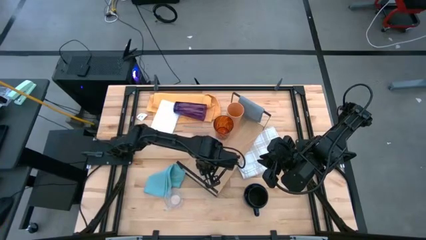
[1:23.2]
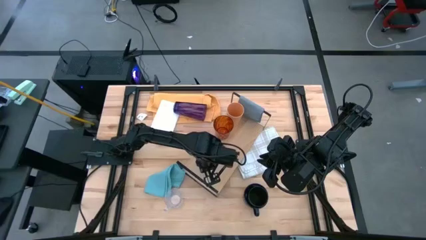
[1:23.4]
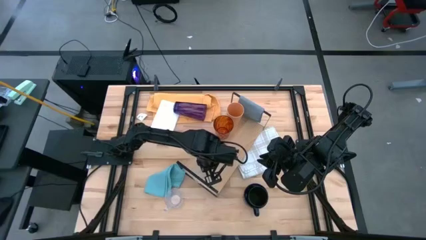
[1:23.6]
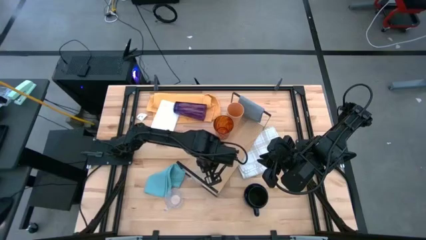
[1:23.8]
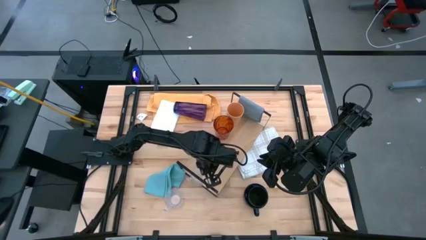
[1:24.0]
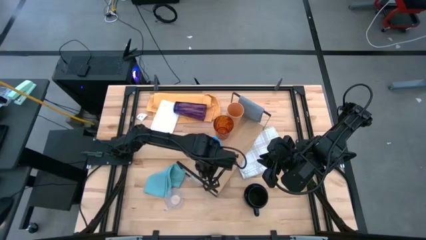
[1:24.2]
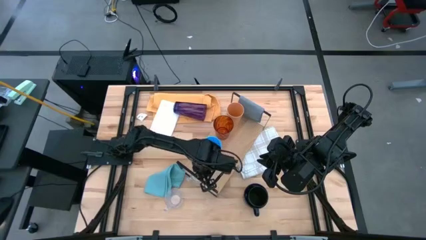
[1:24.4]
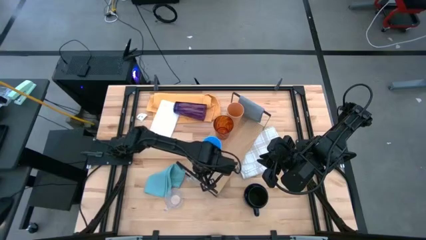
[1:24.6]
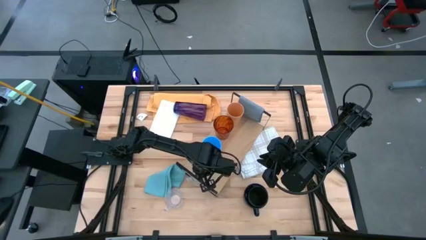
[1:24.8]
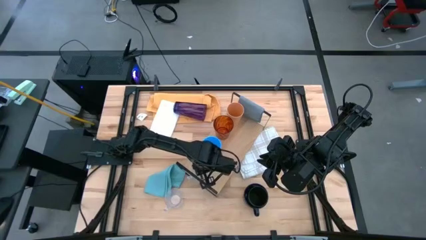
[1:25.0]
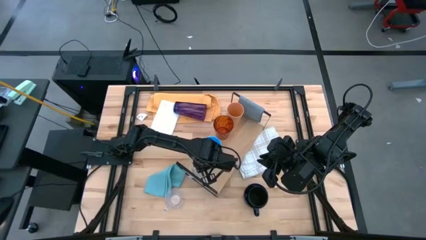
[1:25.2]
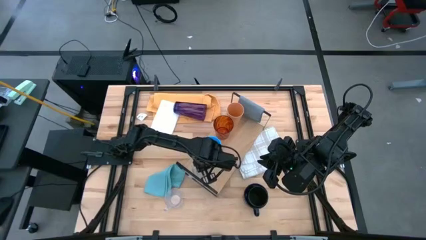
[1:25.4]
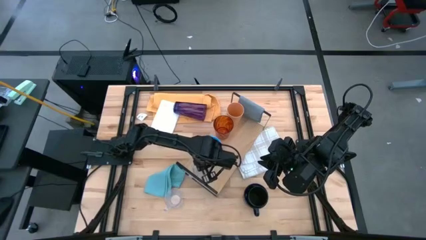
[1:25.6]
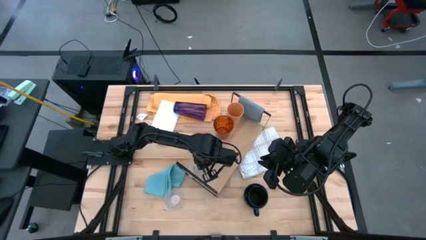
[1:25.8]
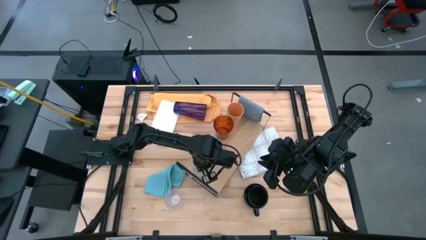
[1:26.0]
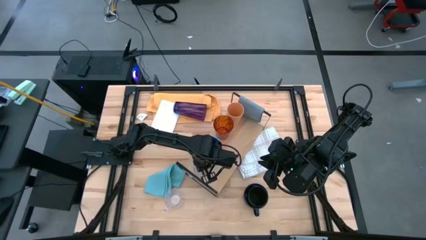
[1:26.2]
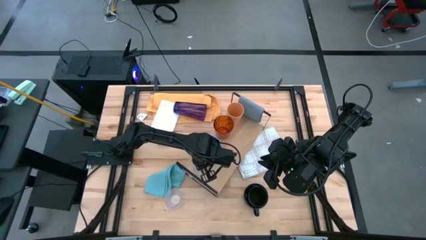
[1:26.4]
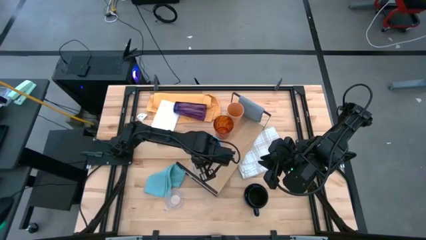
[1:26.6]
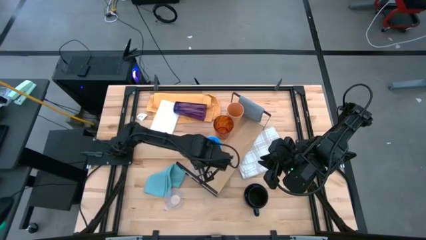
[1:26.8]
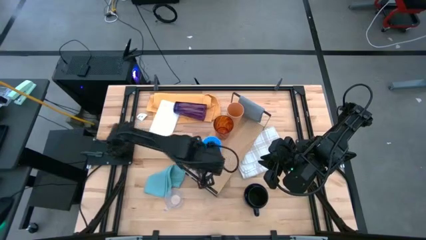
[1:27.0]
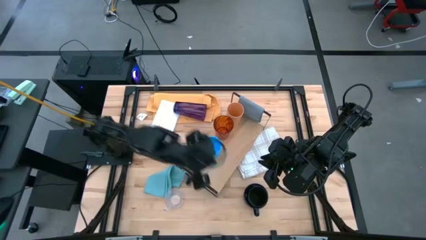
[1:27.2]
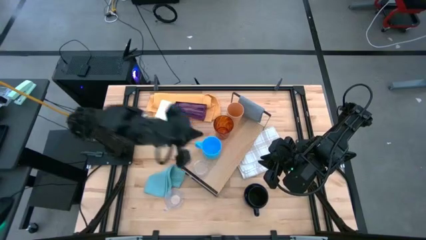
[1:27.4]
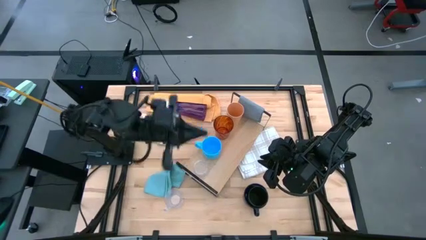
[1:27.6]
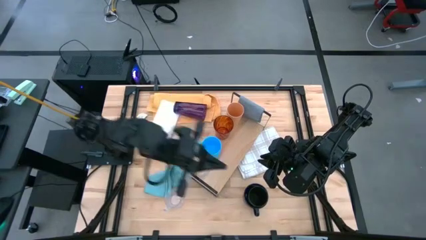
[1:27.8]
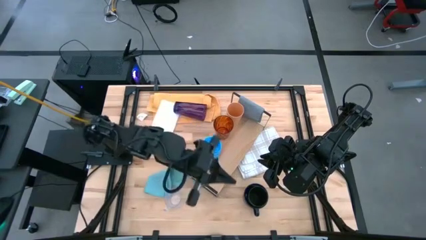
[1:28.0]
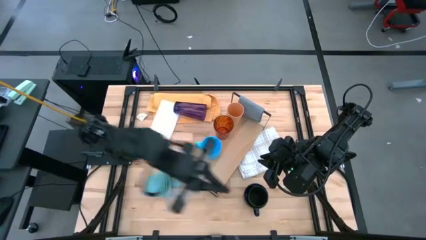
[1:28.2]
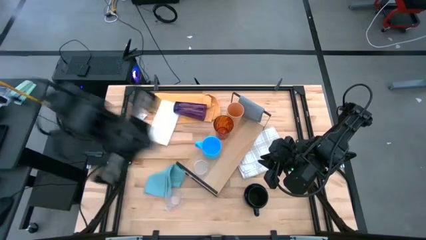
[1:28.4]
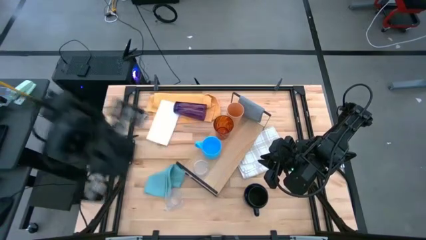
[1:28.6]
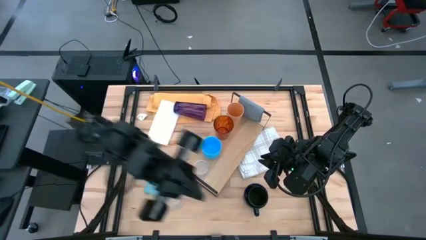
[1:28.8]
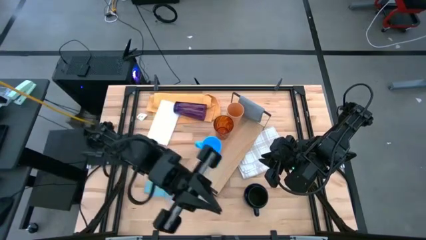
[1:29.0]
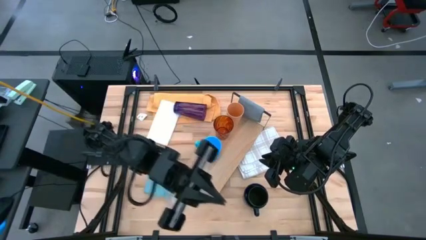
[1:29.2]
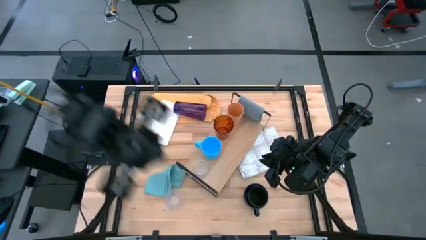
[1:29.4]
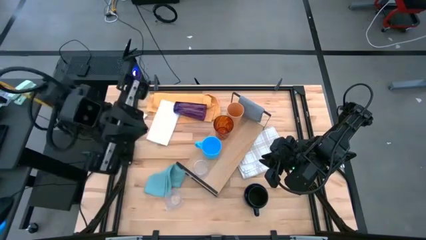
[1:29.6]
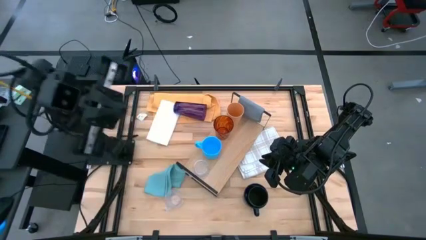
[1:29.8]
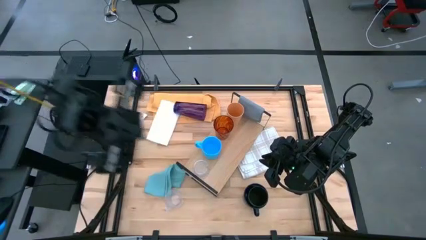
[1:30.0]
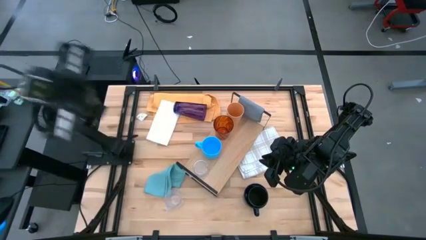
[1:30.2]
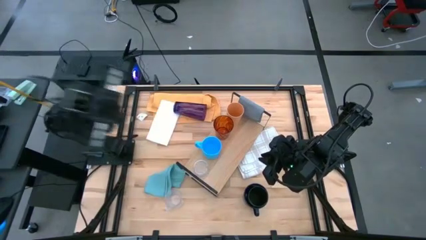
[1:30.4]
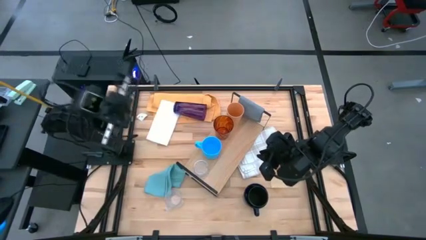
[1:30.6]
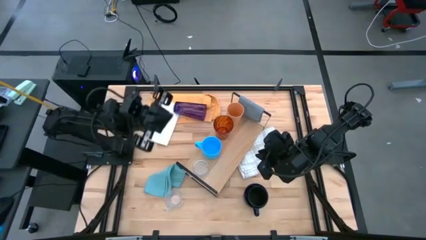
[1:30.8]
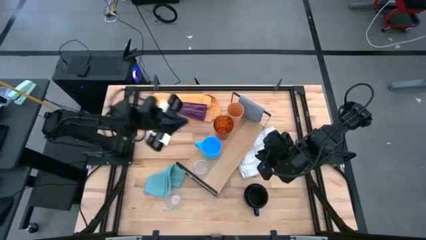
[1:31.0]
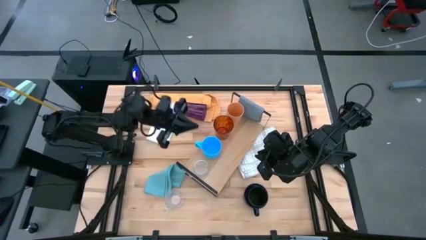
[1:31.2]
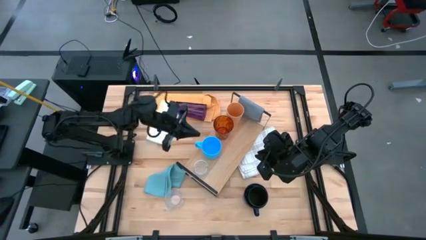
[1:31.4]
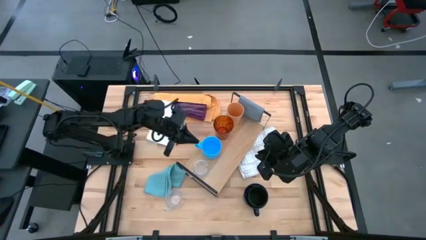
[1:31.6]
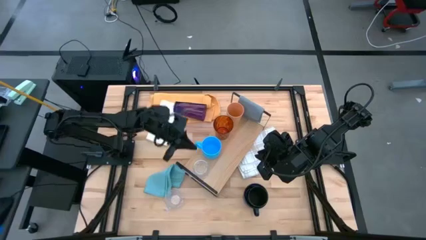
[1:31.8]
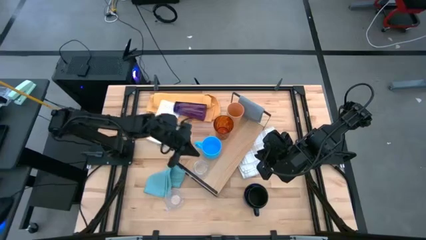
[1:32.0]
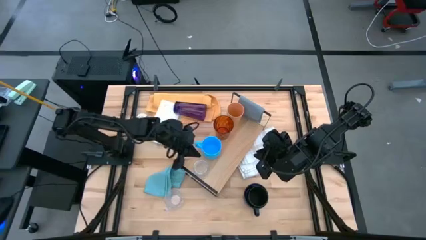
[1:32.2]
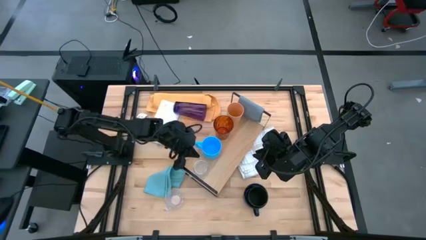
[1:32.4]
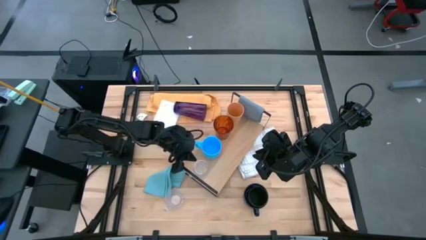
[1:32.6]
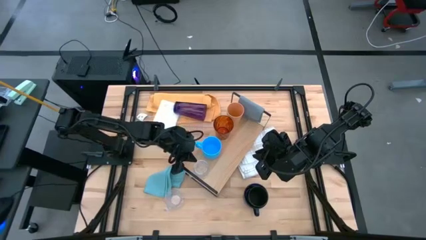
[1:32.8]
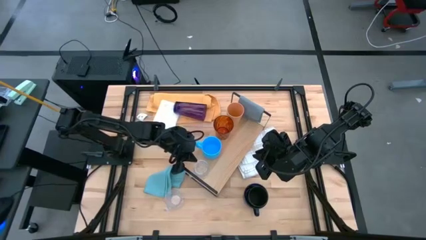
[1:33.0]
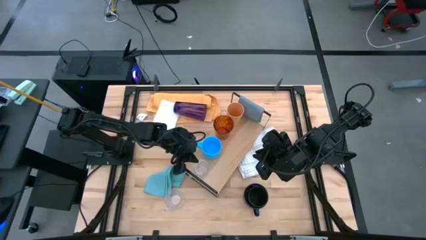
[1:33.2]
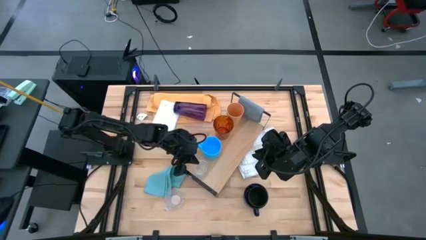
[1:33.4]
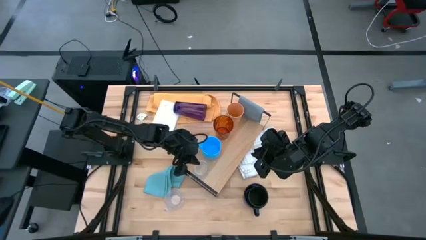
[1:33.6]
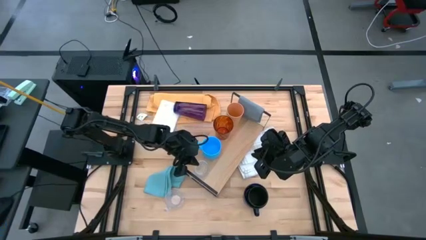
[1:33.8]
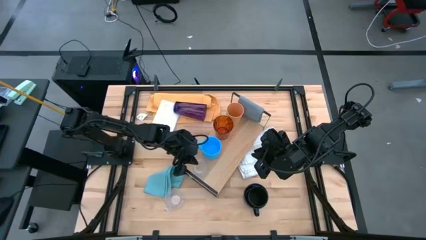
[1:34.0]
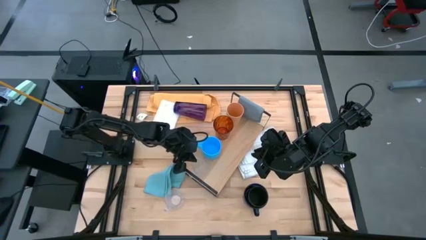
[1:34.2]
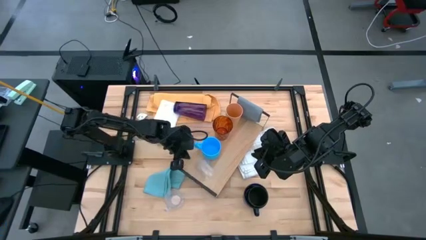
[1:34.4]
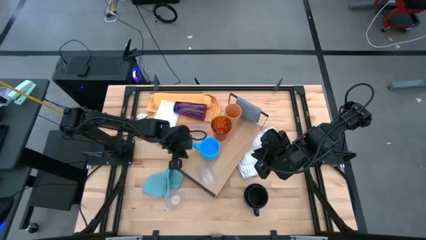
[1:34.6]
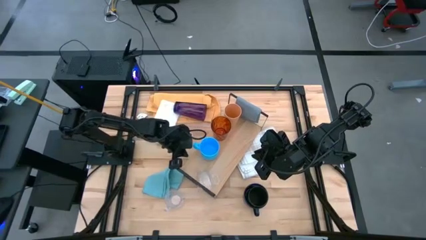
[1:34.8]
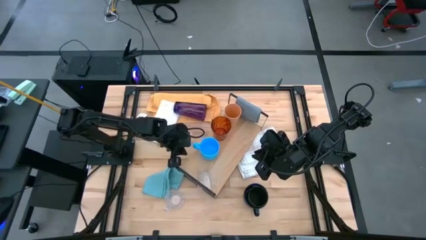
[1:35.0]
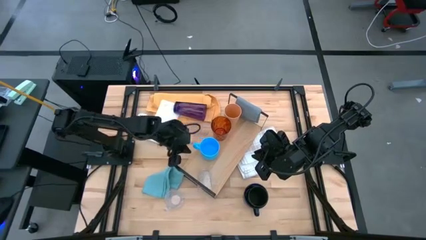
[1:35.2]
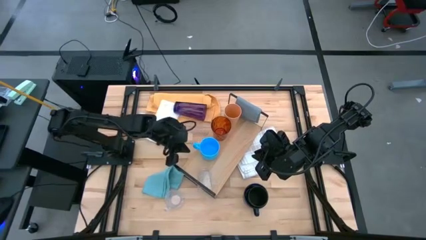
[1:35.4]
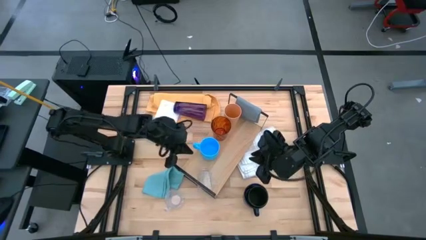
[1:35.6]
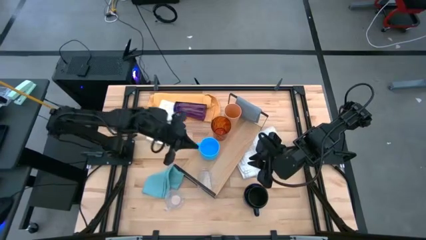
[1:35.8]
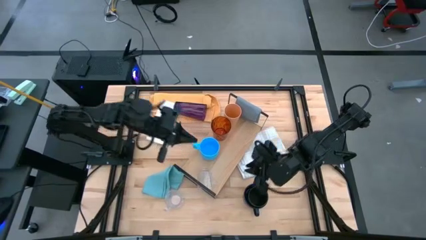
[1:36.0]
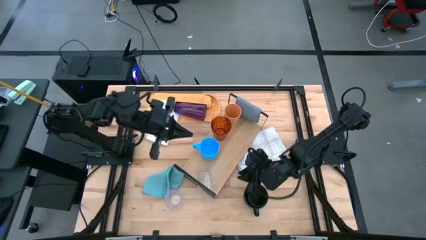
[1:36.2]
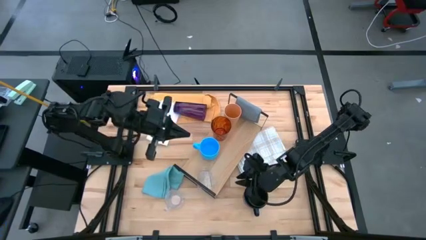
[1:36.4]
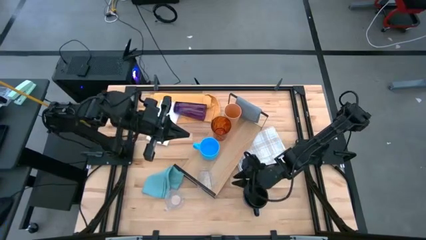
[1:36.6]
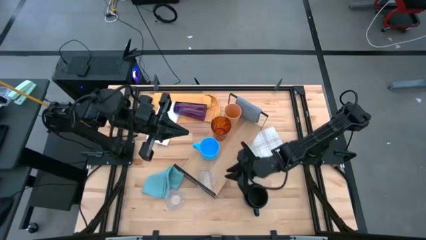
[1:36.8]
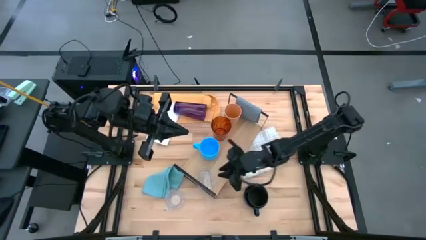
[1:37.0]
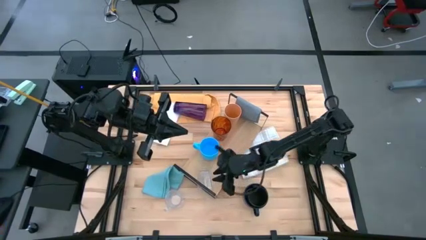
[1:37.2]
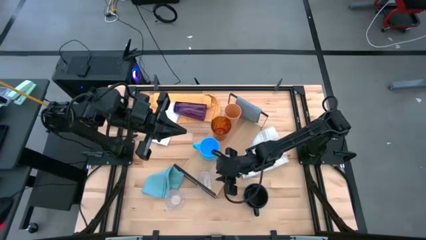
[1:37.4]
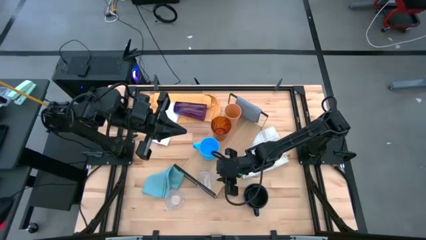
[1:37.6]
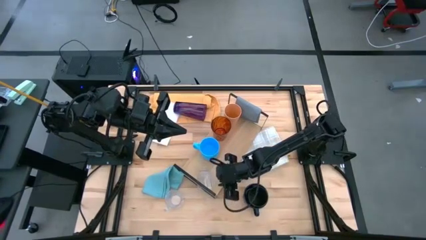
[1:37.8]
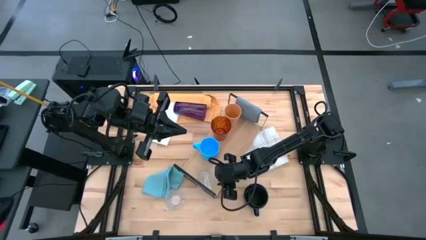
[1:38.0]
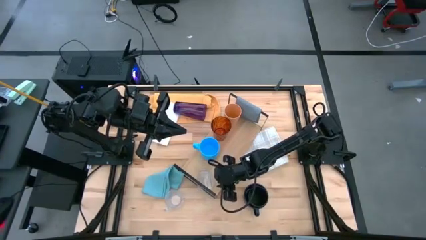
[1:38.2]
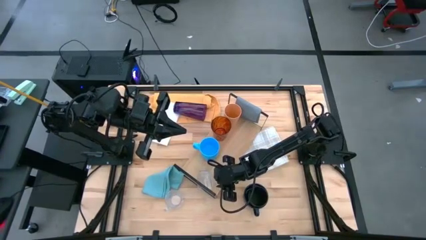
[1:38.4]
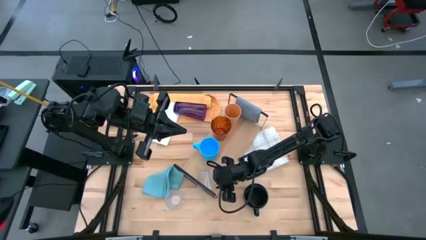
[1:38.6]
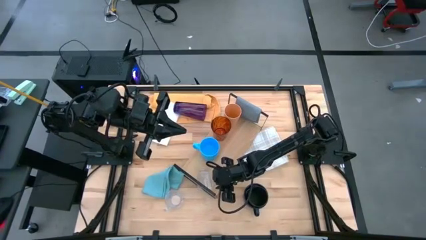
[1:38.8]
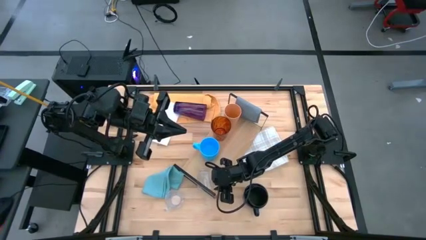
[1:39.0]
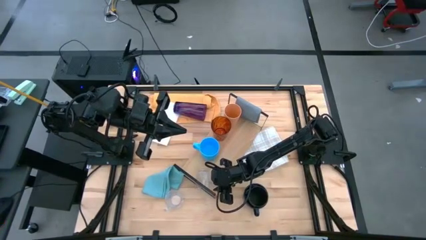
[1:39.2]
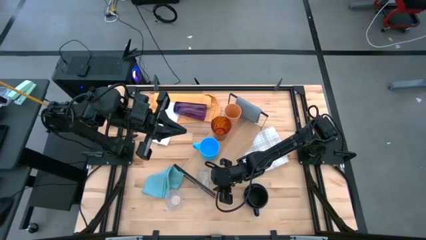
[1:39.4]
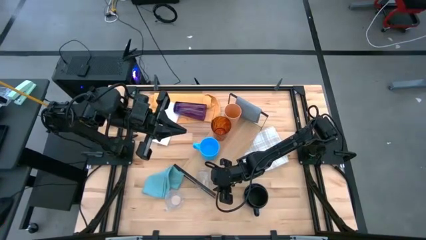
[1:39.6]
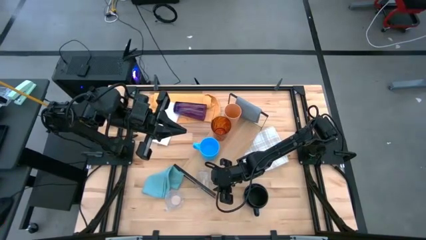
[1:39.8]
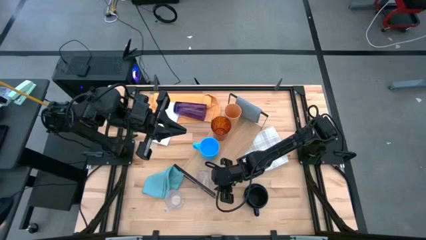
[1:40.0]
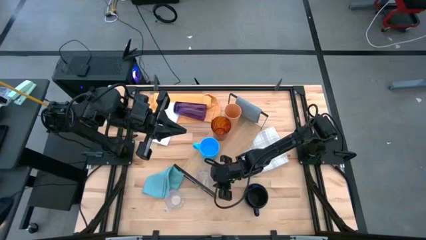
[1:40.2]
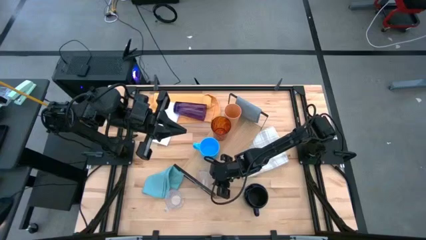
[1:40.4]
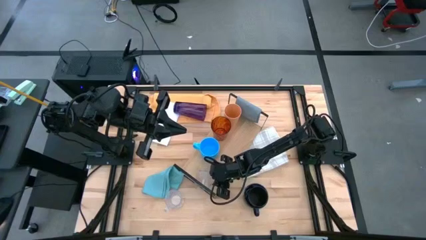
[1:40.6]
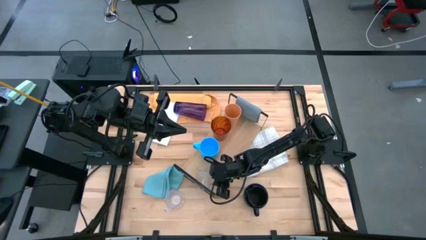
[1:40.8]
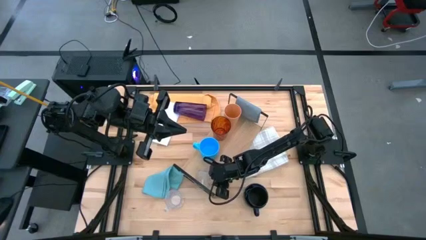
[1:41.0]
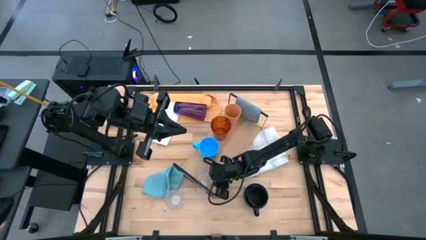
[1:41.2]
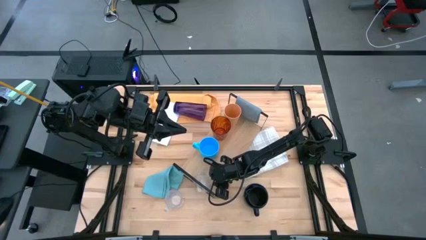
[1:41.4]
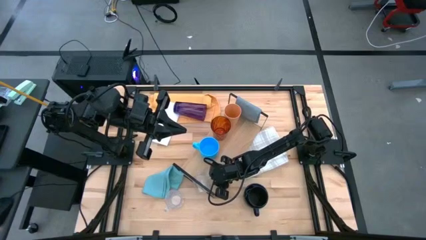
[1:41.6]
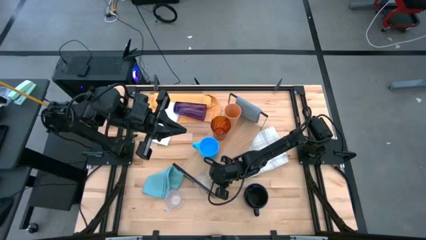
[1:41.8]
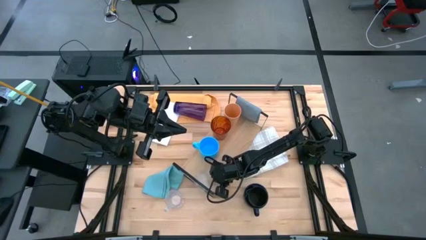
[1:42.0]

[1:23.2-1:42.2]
Task: Stack small to large cups/mugs on shelf
Put the transparent mug on the shelf
